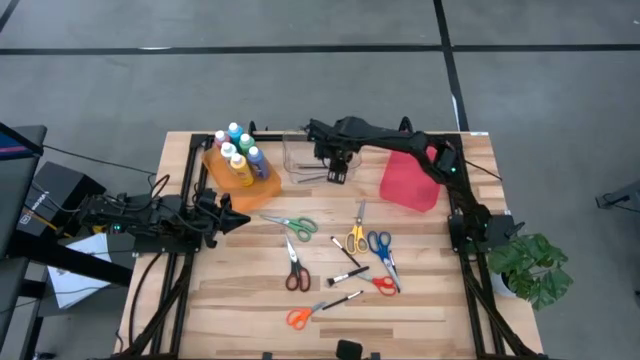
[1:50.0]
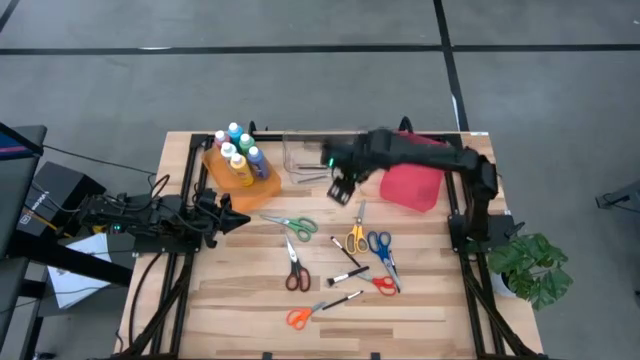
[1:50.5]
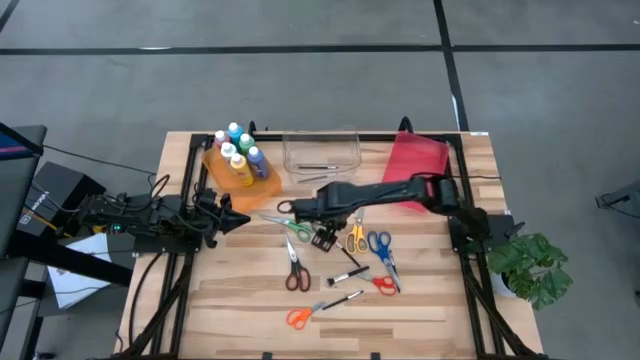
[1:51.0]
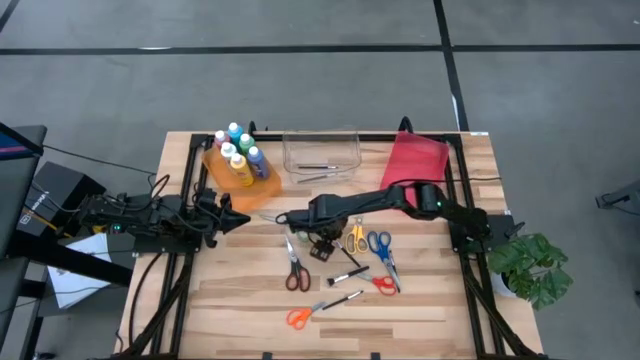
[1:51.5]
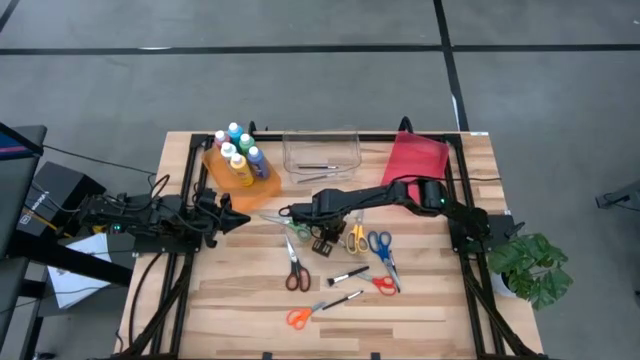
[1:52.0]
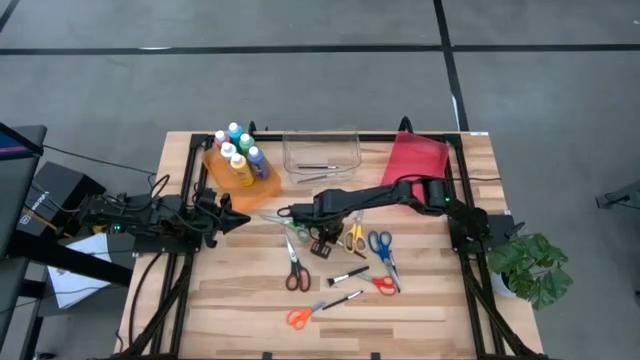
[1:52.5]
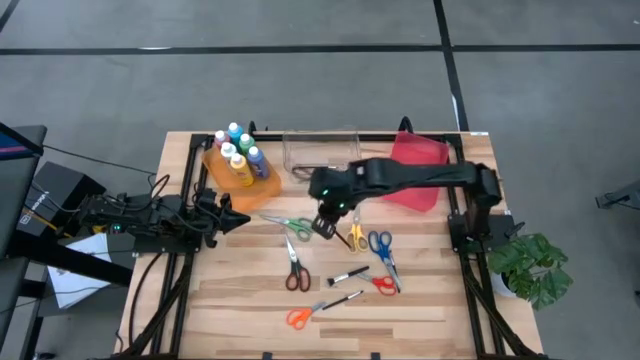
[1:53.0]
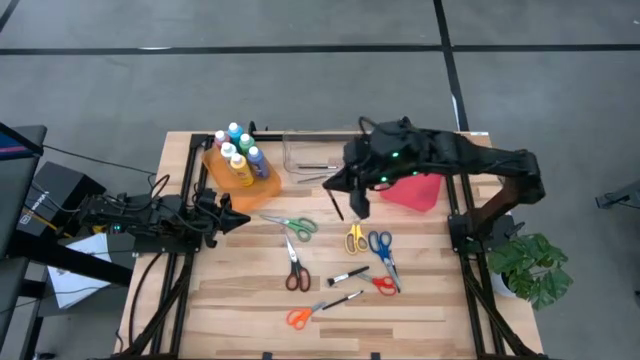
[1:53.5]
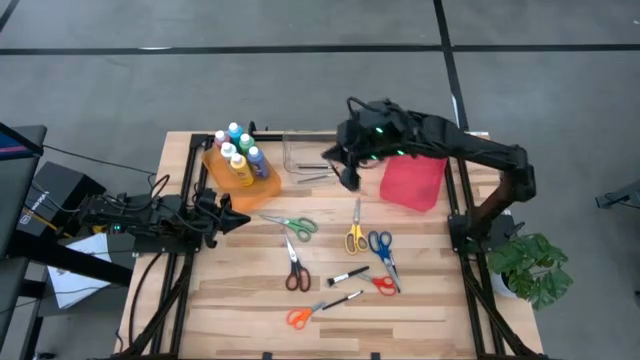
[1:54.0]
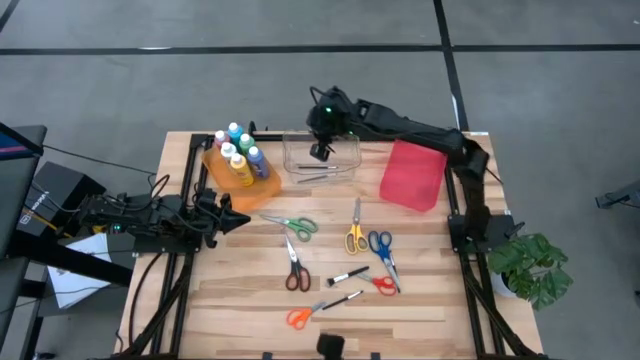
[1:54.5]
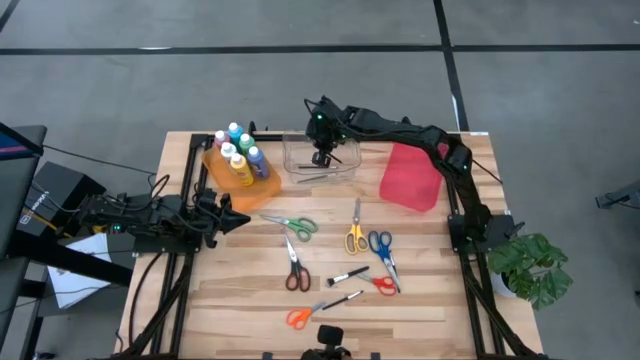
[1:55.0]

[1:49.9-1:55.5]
Task: Pick & Place Paint Supplies
Put the black paint brush into the transparent bin

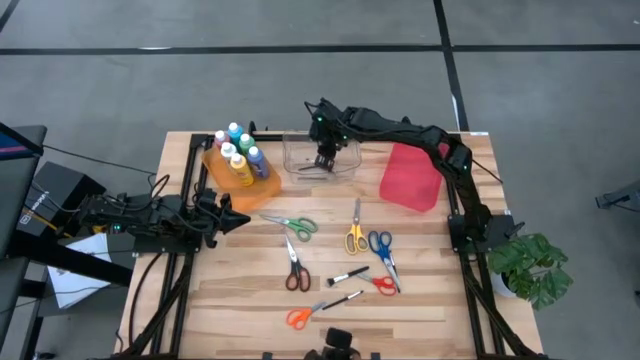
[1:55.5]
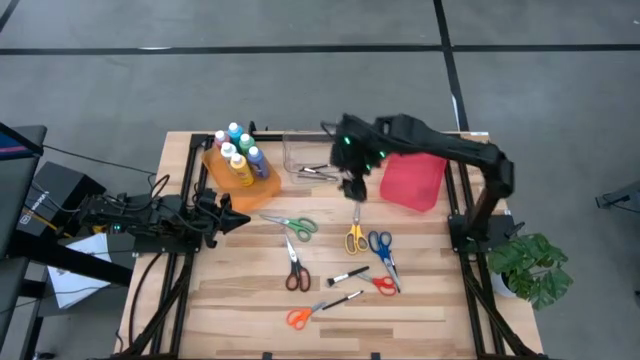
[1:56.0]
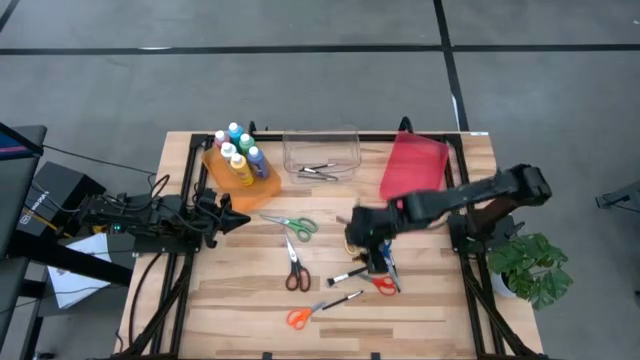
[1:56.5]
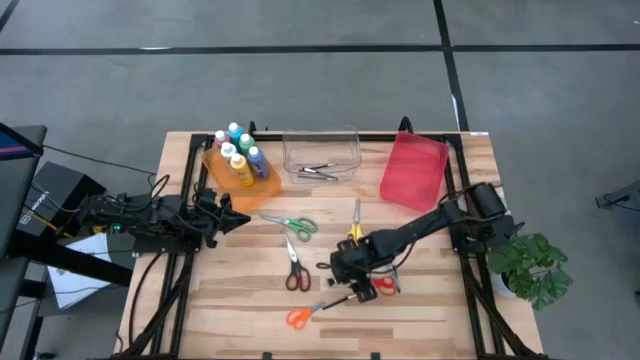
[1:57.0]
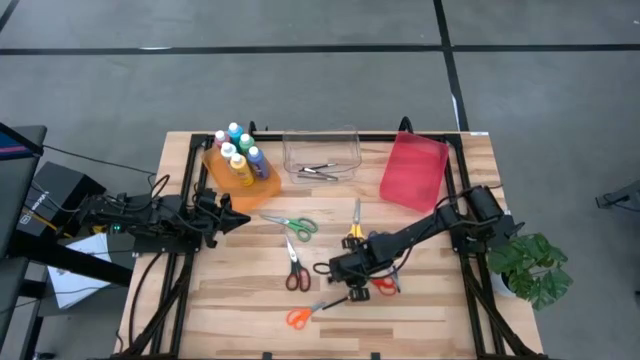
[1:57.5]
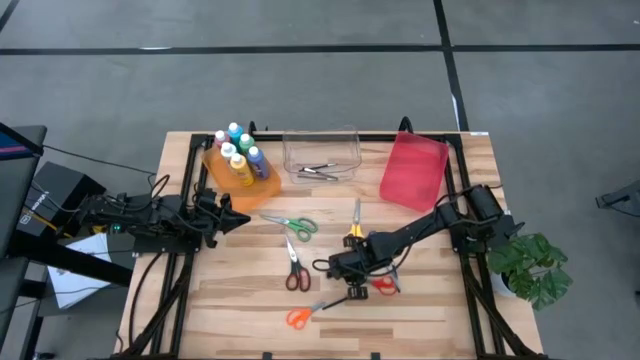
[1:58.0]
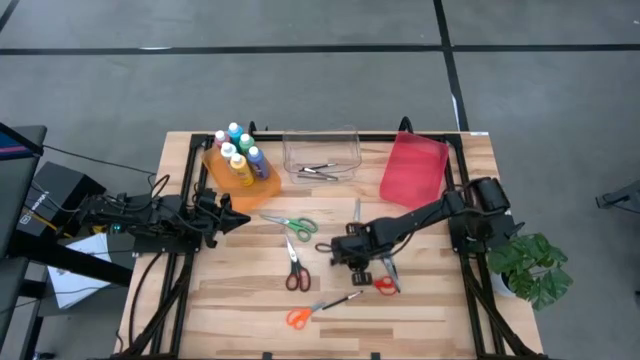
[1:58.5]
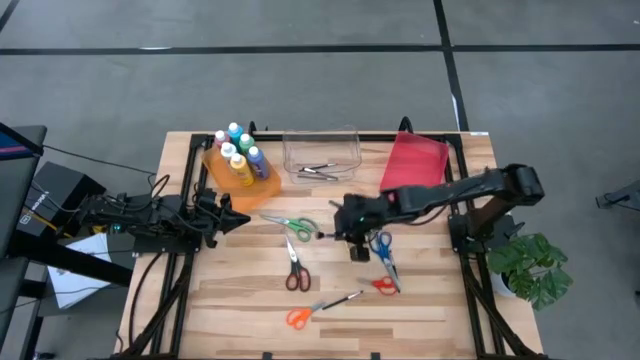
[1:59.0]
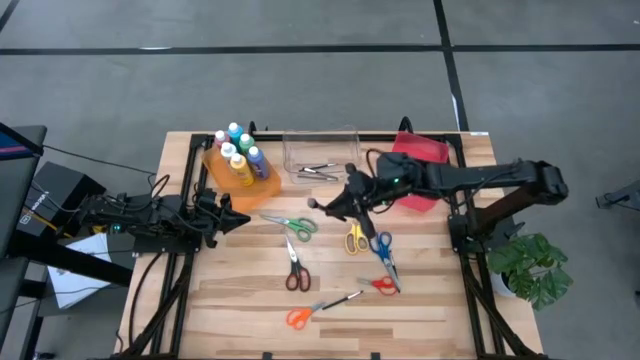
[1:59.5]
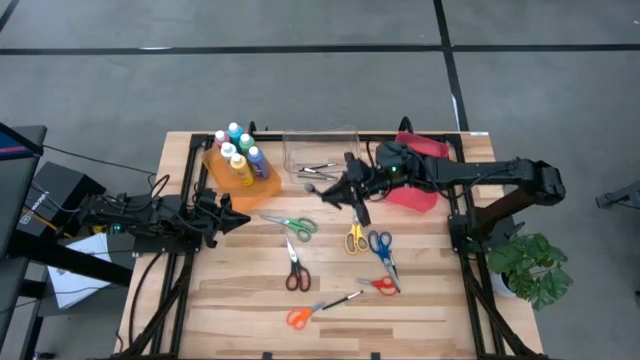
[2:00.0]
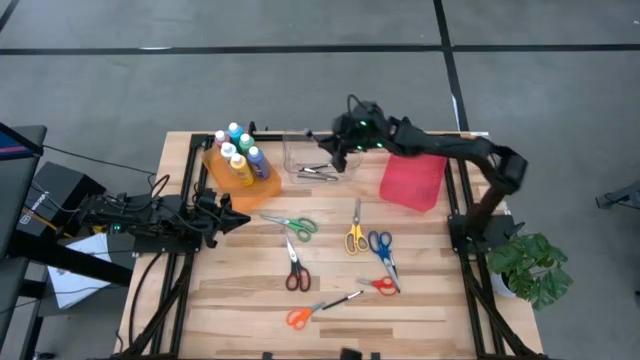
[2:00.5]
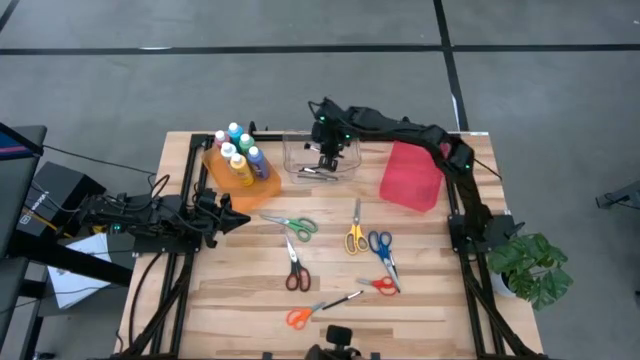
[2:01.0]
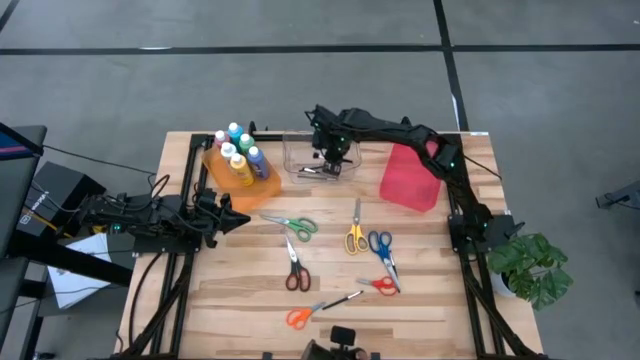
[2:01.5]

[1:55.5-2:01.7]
Put the black paint brush into the transparent bin

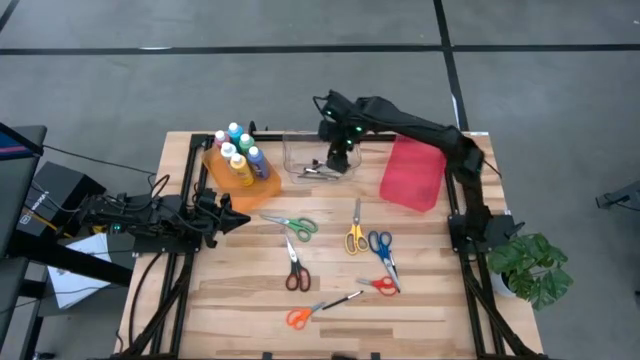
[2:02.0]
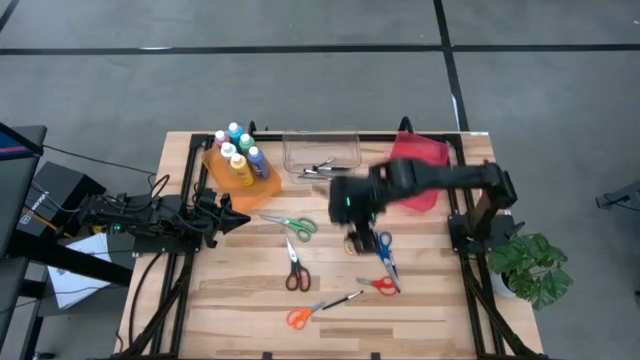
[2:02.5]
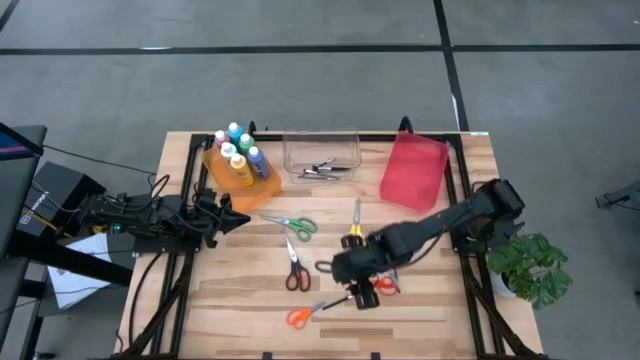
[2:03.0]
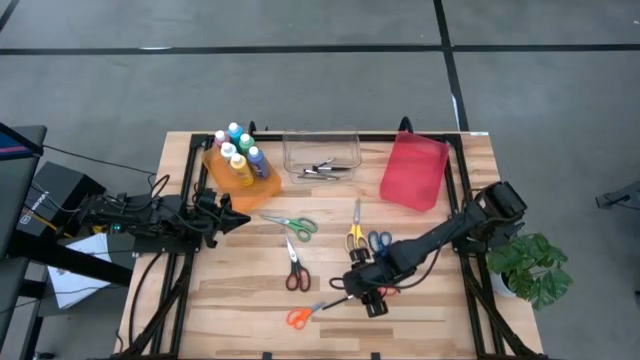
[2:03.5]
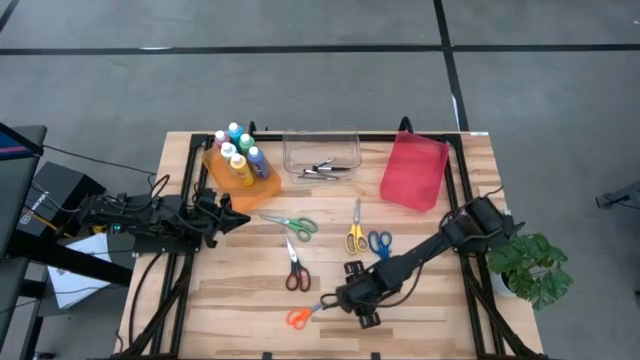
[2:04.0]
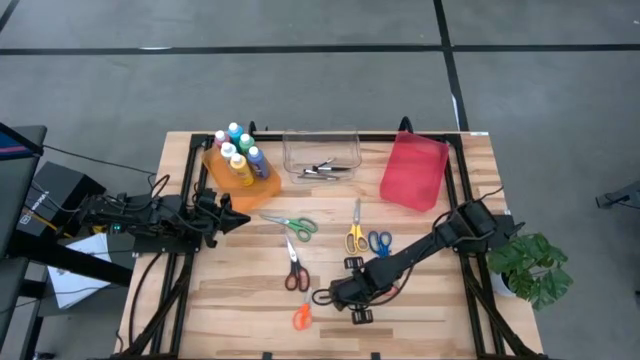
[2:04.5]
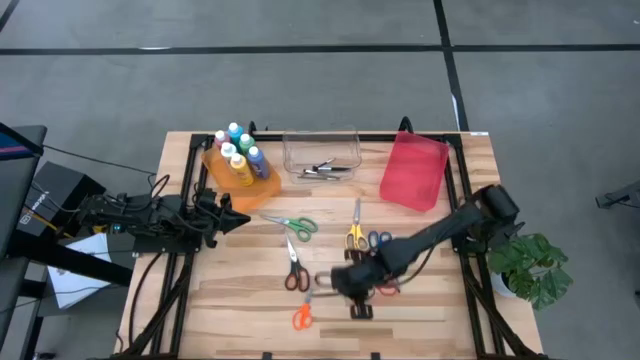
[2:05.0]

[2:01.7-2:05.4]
Put the black paint brush into the transparent bin

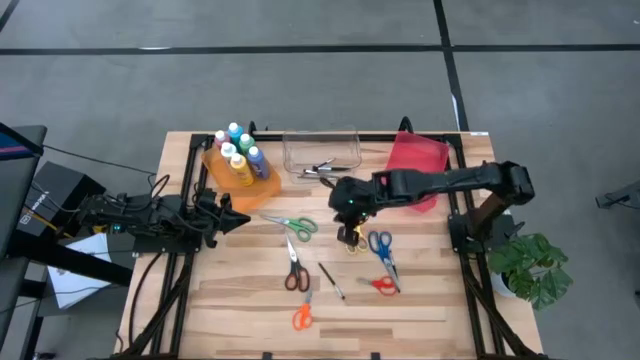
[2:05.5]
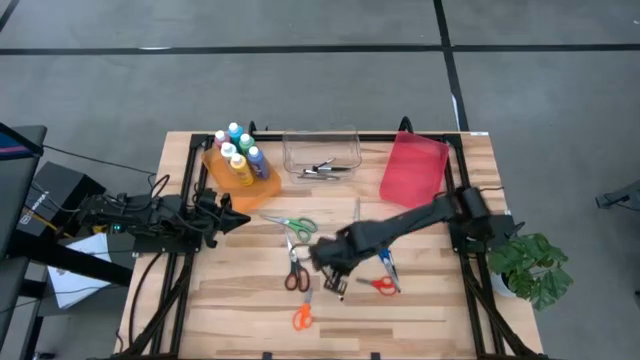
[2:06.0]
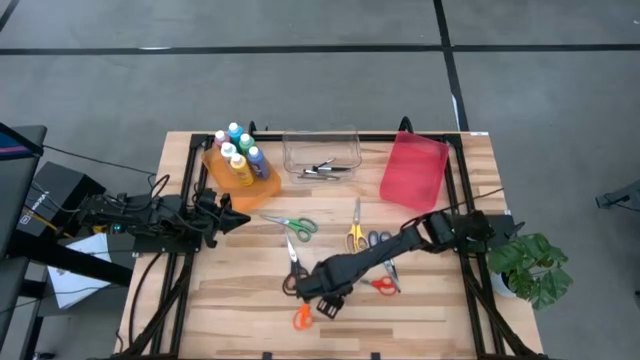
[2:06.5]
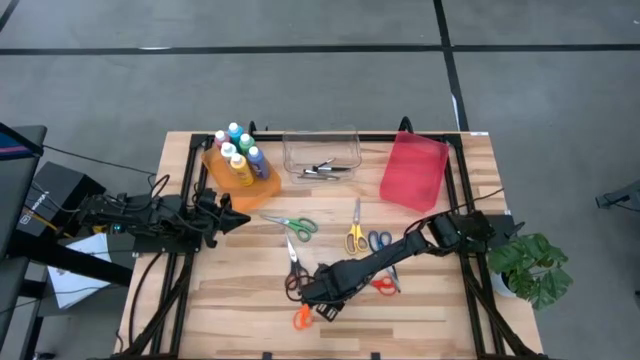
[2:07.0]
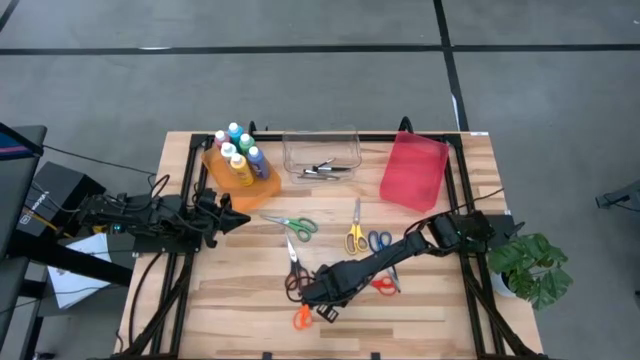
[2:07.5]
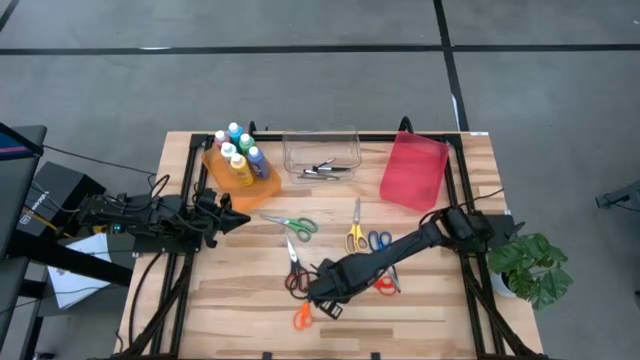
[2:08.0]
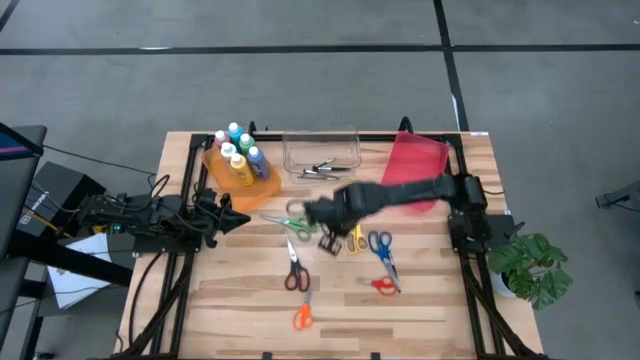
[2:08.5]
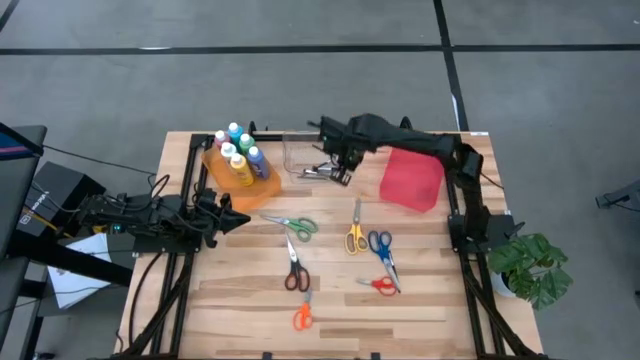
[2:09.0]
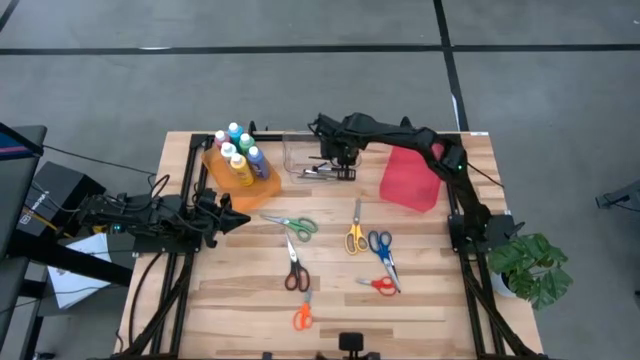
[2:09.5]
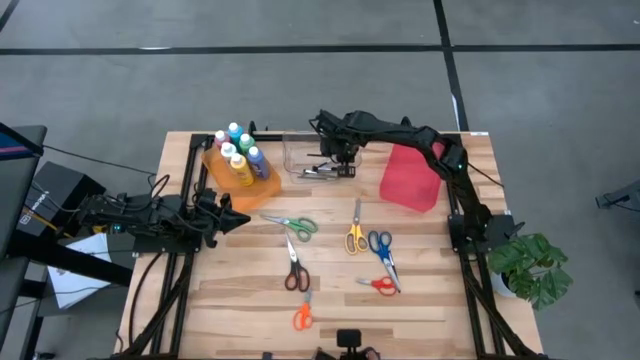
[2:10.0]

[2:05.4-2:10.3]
Put the black paint brush into the transparent bin
